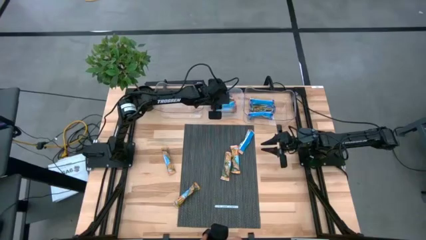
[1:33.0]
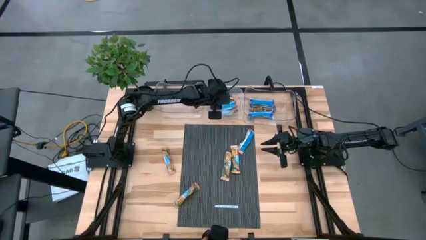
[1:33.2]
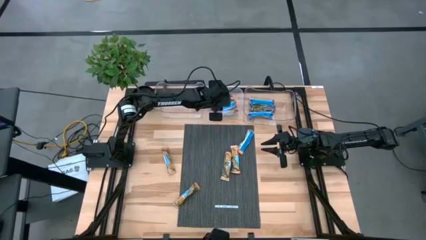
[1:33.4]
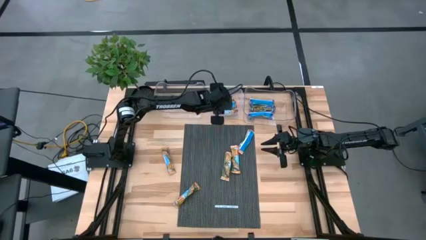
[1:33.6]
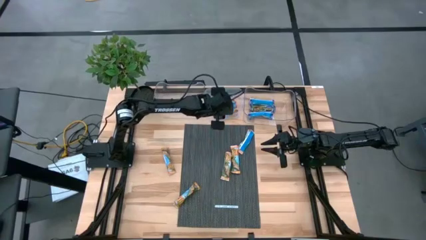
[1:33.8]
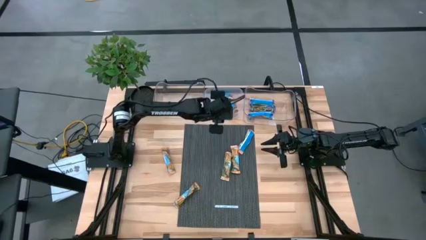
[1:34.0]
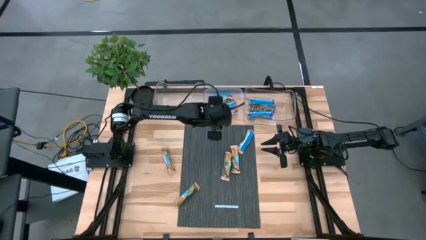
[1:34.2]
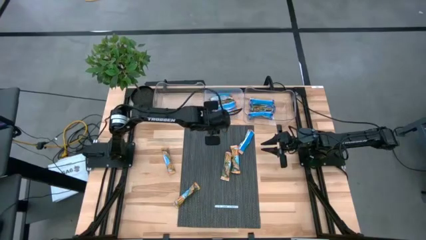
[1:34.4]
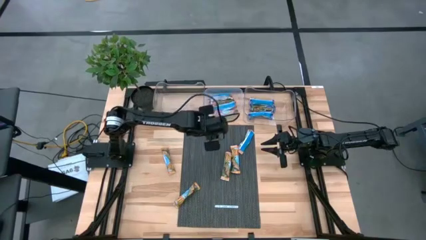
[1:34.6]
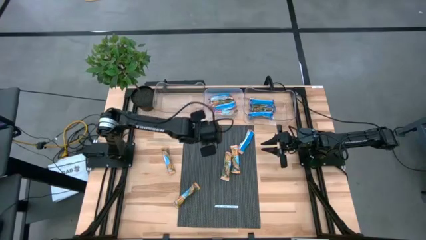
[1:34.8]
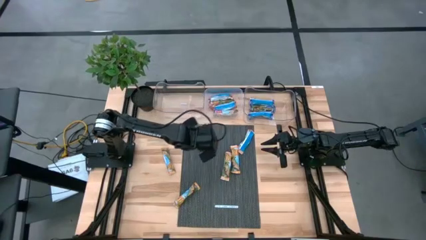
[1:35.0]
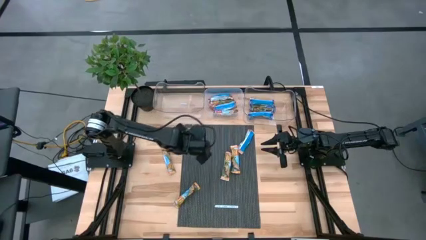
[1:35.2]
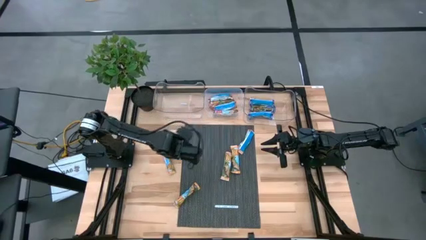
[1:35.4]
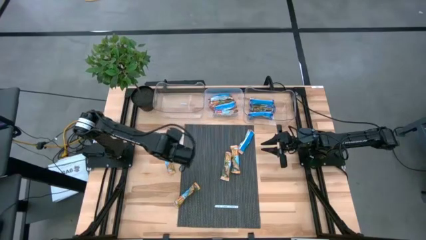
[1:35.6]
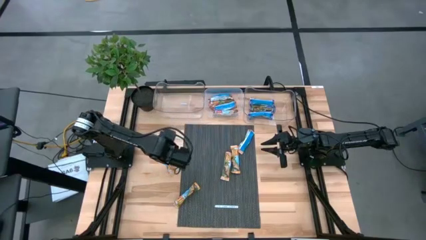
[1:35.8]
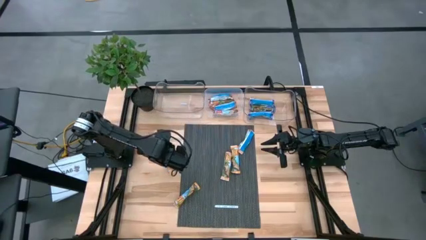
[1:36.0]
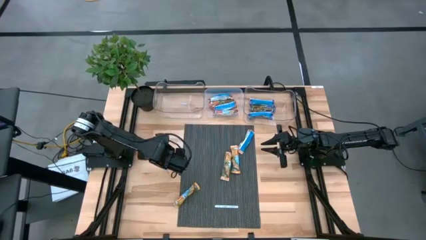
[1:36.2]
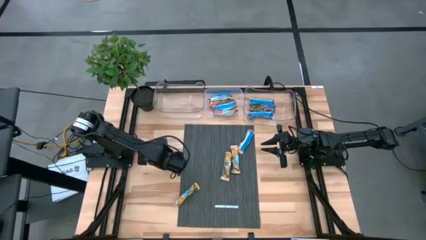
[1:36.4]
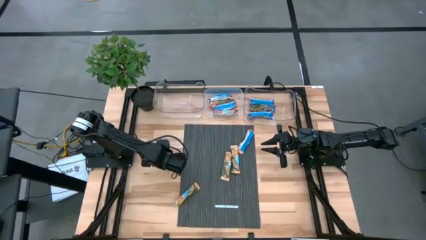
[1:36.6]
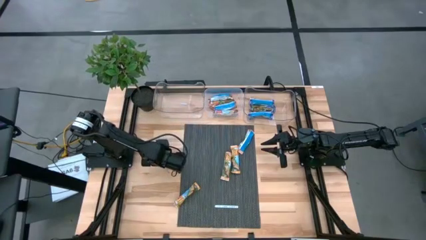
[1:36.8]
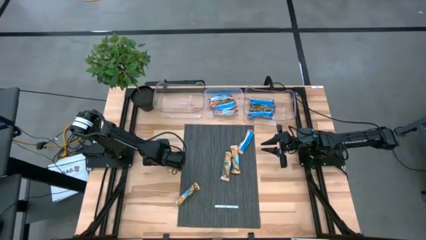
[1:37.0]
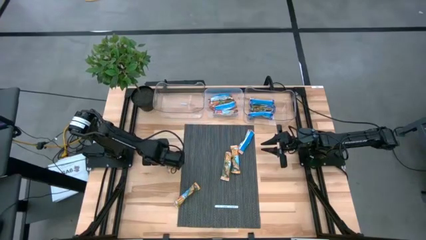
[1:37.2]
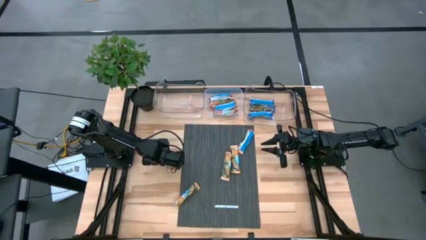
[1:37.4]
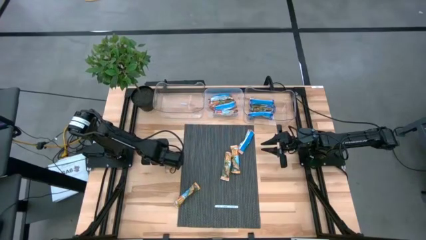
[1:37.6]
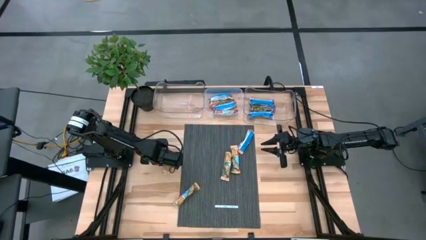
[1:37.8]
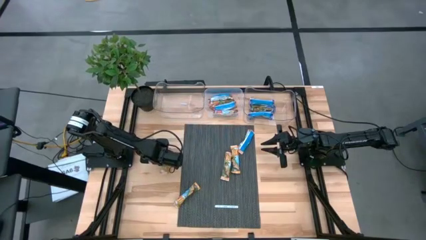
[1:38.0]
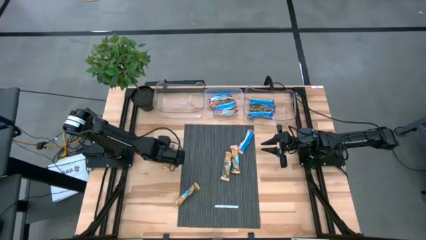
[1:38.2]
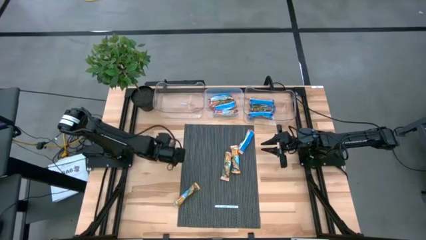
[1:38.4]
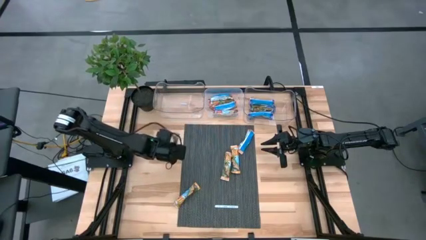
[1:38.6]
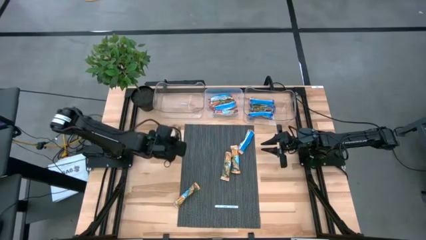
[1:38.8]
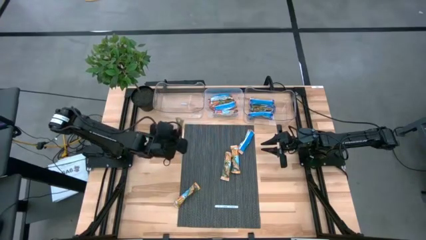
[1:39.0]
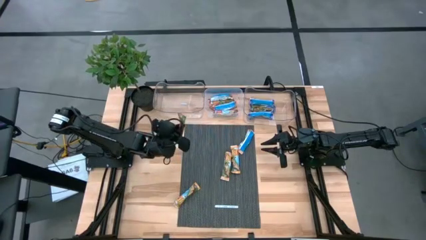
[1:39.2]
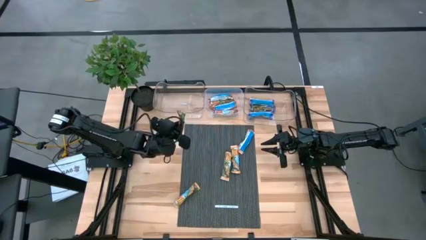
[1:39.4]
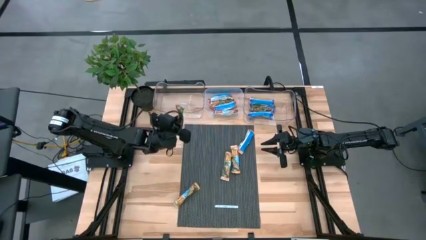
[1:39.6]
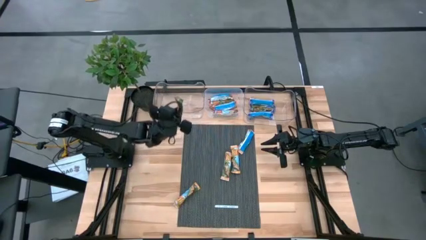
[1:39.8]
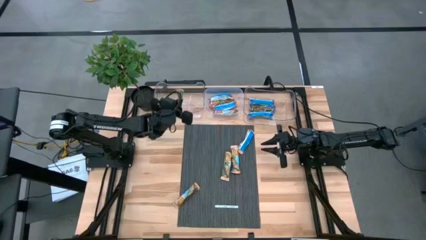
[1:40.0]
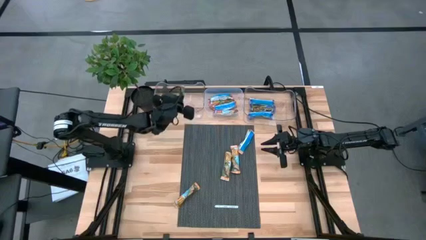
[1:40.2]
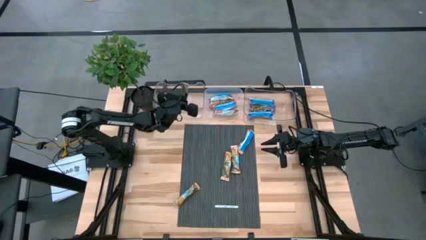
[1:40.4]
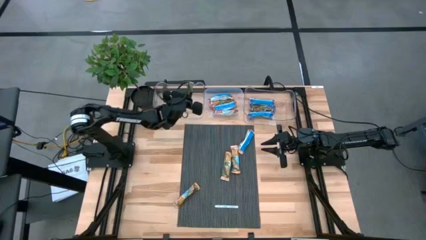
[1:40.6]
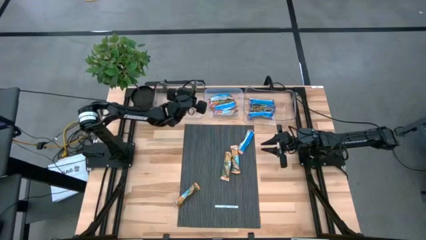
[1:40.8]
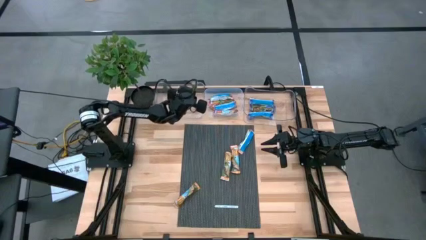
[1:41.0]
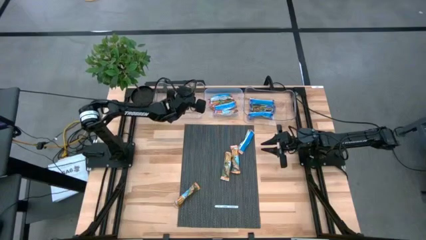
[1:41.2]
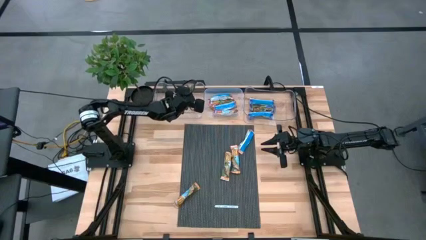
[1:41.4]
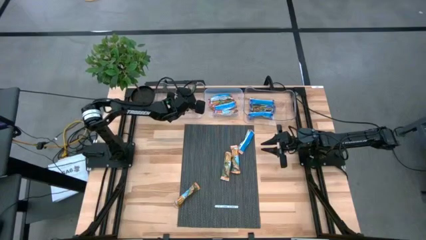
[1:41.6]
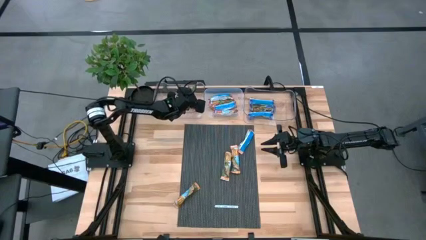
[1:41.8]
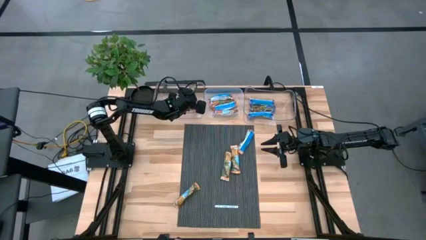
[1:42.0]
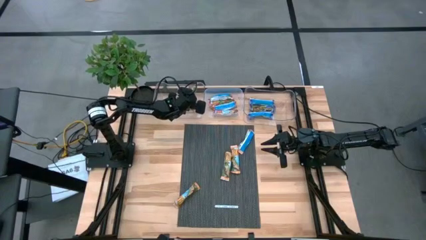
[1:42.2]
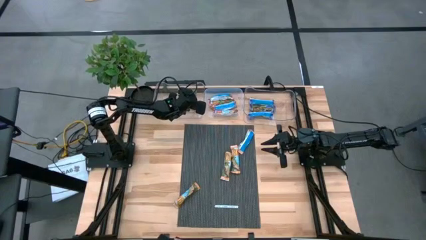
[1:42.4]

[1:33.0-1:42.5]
Task: Pick and place Granola Bars by type
Put the orange granola bar into the left transparent bin

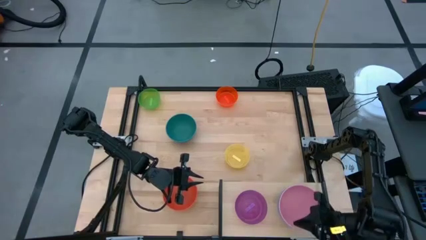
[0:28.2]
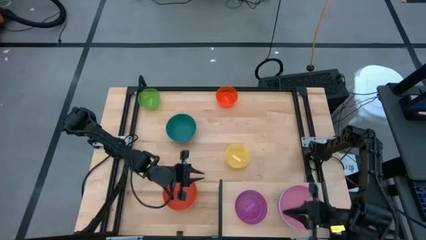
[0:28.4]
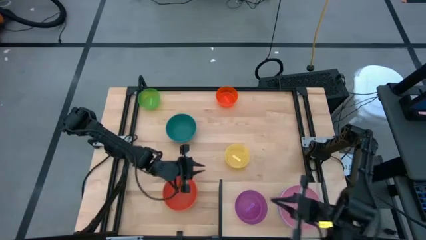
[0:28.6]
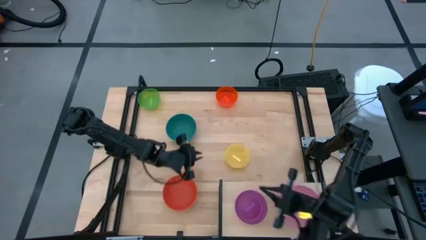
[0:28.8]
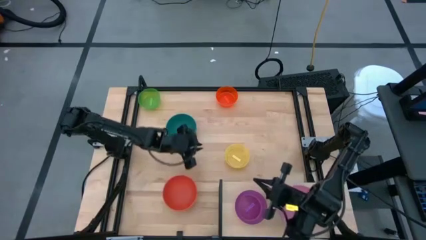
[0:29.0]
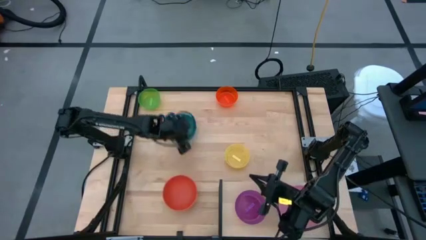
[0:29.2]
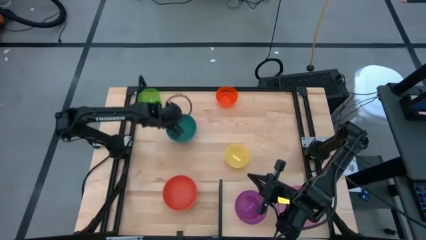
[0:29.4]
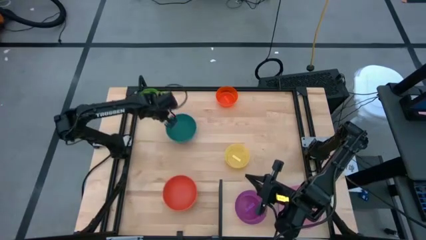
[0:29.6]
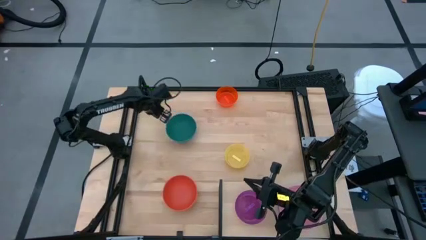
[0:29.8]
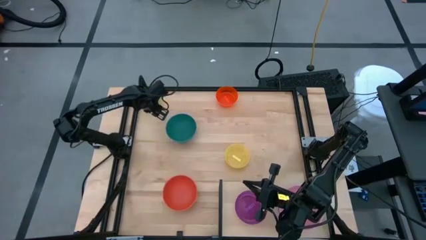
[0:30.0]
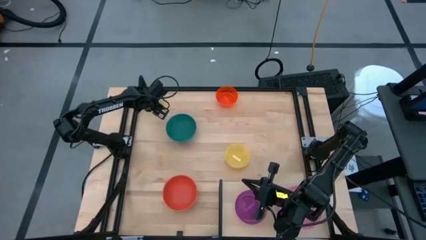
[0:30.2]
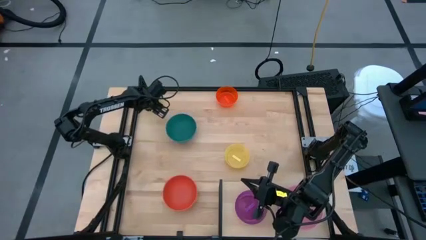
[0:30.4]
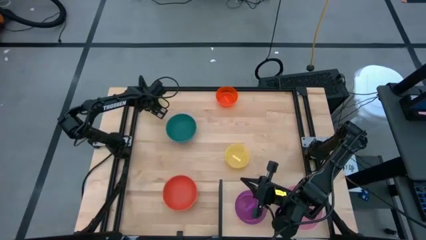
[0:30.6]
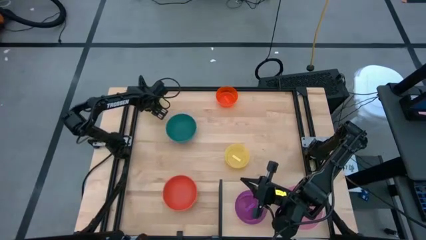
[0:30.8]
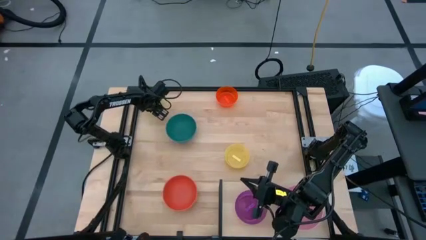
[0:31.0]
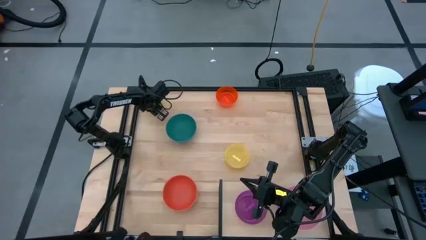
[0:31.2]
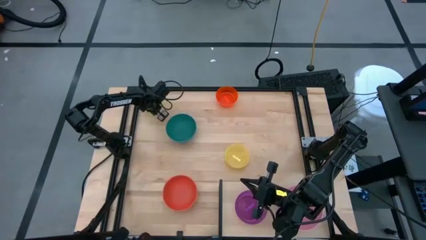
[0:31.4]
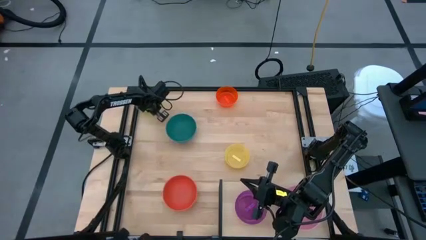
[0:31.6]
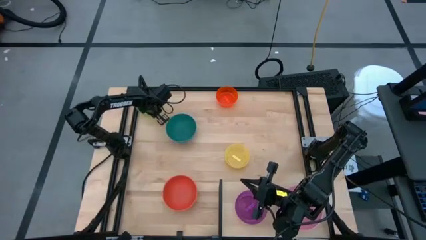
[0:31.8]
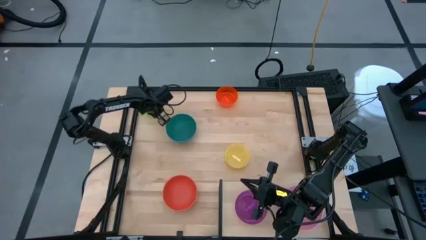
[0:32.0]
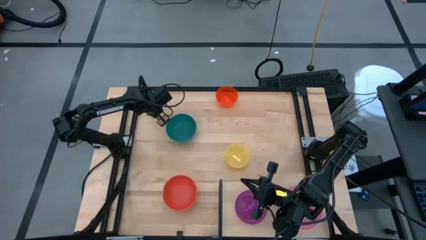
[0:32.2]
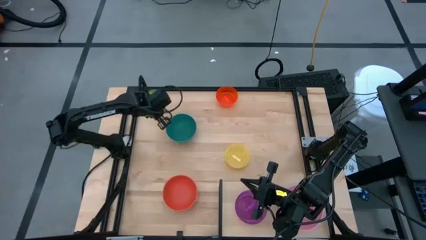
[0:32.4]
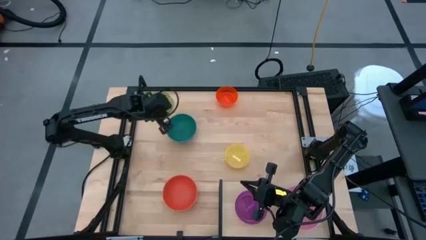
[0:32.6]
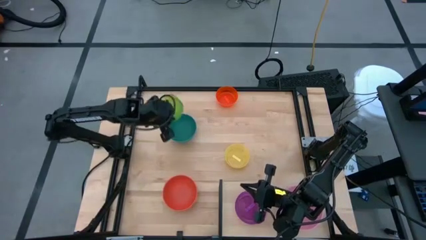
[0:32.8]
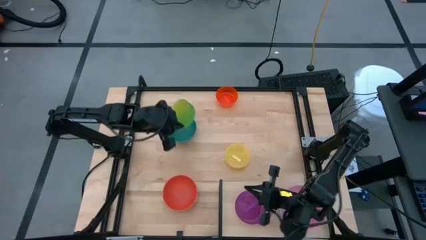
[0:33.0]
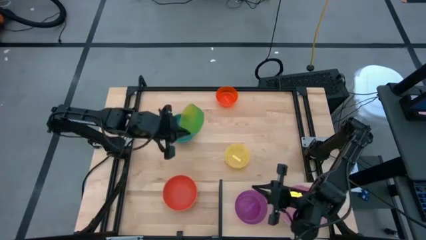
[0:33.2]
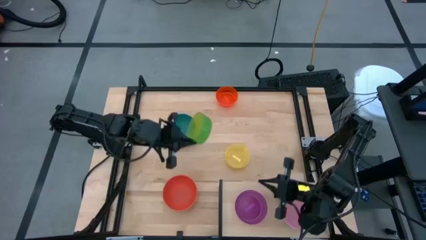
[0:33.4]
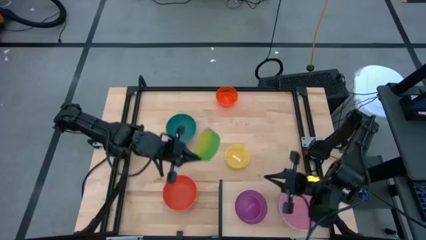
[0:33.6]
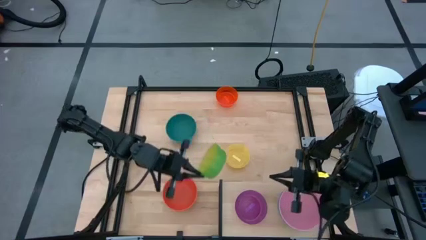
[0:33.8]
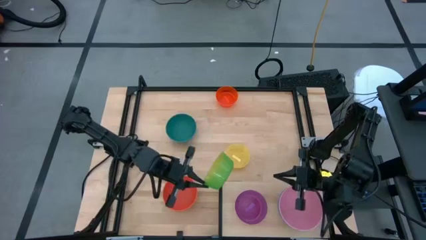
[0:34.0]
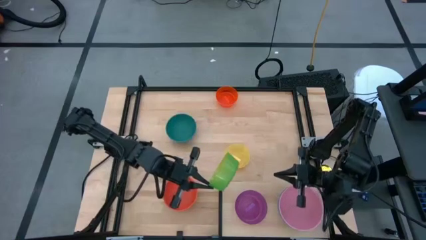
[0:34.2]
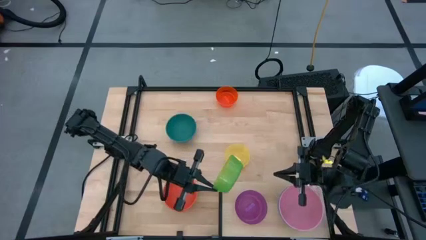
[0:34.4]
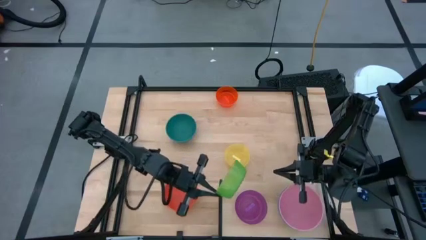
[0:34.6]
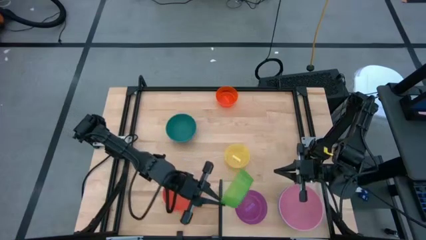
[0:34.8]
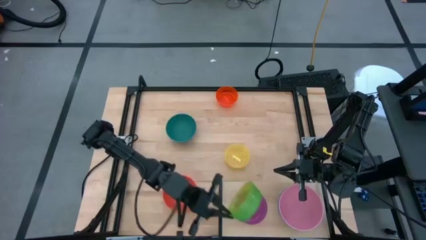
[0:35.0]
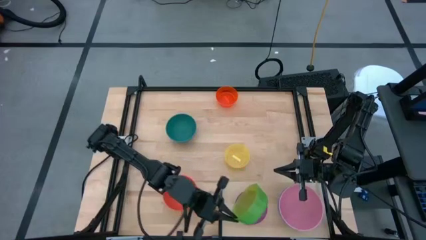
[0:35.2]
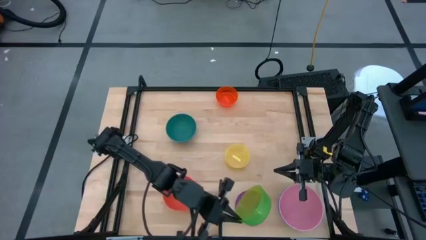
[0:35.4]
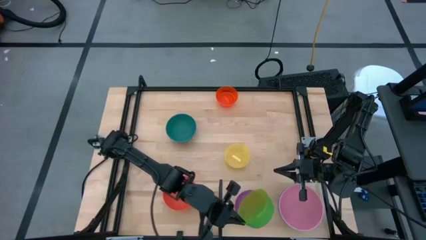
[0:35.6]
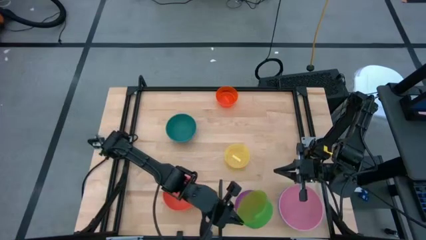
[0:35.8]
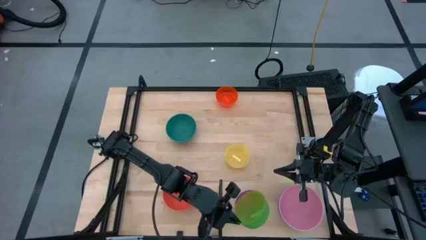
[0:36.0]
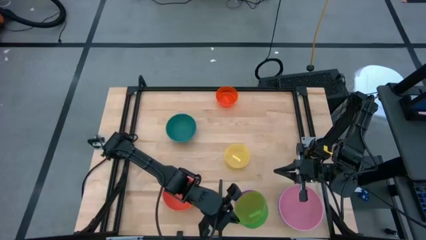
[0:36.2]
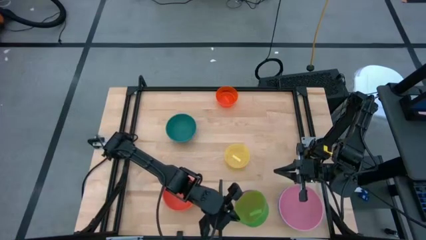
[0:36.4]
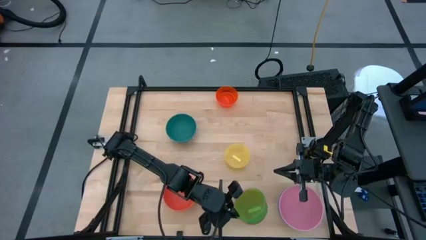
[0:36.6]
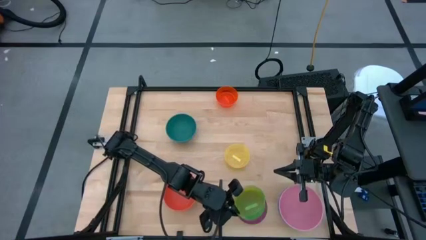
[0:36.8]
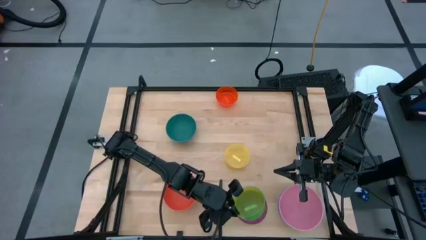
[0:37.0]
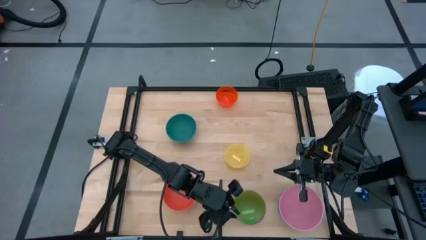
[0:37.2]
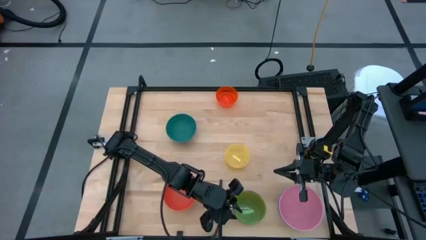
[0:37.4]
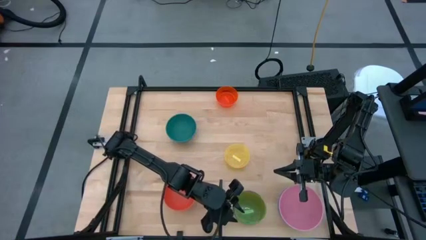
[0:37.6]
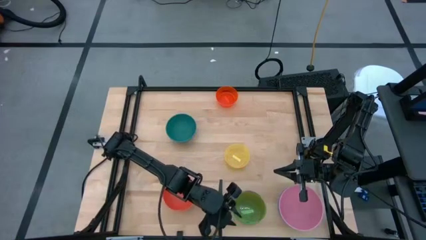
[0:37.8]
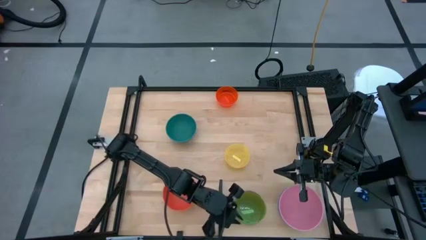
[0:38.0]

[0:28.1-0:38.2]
Task: Place and stack bowls onto a shelf
Stack the light green bowl on top of the purple bowl on the shelf
